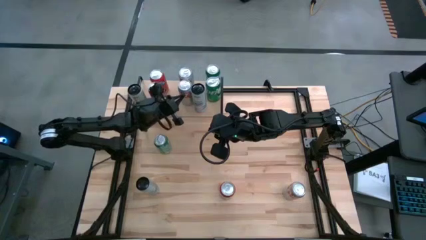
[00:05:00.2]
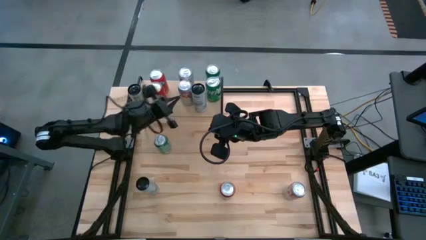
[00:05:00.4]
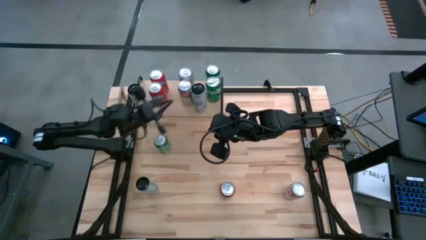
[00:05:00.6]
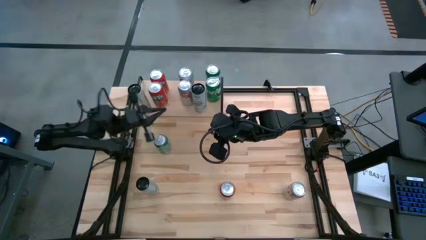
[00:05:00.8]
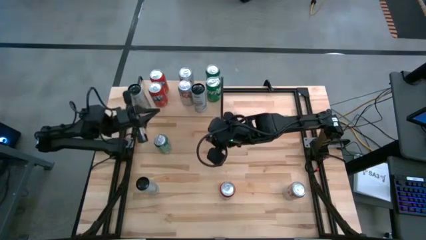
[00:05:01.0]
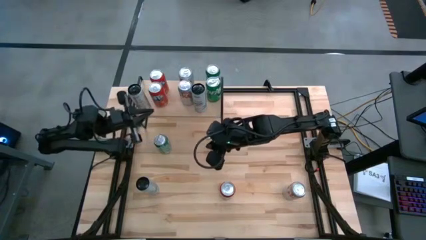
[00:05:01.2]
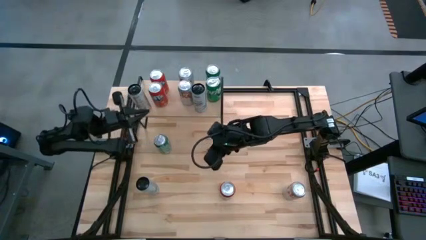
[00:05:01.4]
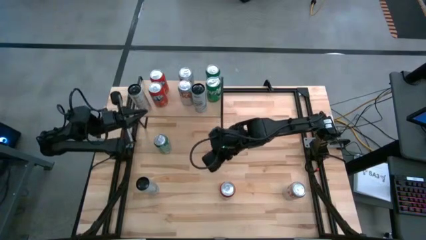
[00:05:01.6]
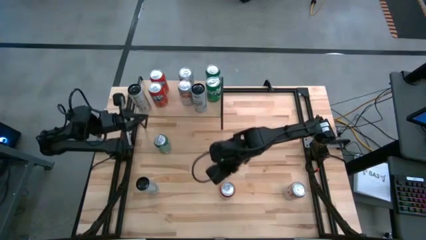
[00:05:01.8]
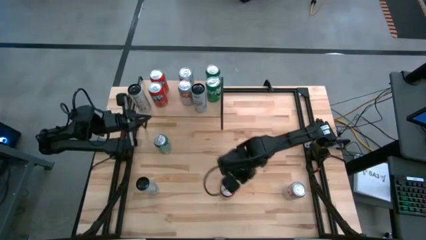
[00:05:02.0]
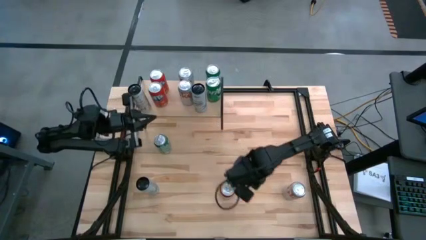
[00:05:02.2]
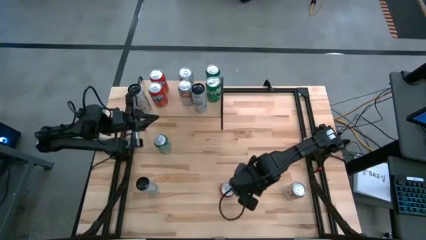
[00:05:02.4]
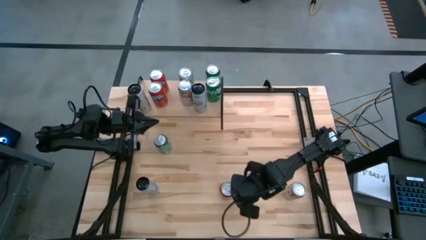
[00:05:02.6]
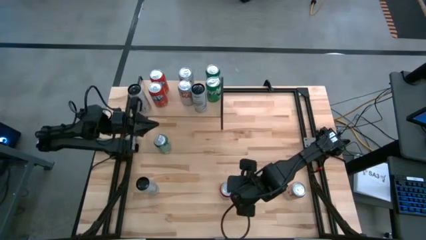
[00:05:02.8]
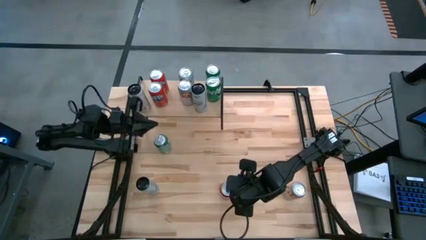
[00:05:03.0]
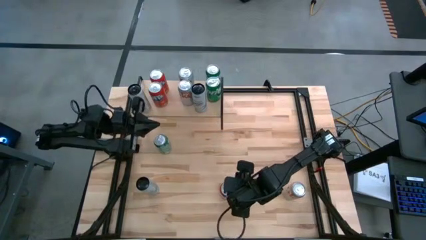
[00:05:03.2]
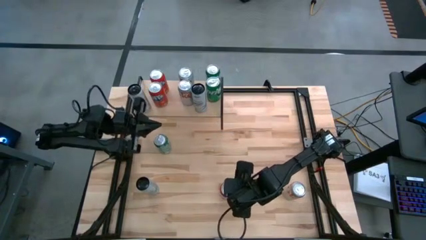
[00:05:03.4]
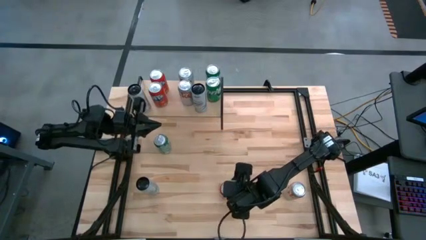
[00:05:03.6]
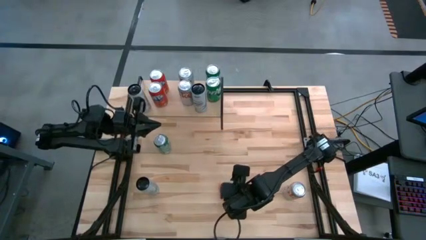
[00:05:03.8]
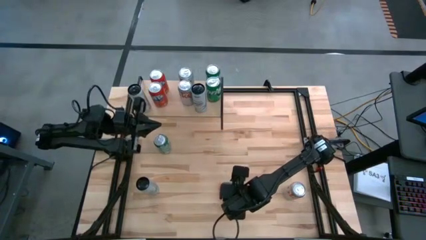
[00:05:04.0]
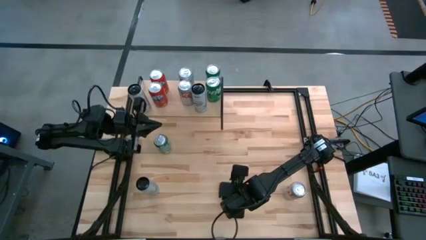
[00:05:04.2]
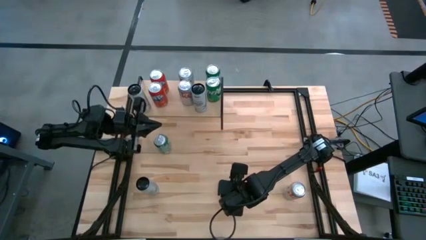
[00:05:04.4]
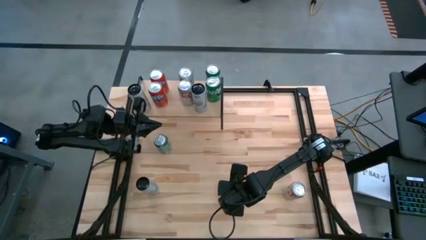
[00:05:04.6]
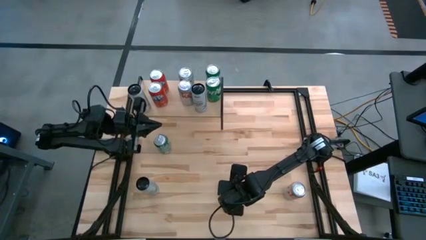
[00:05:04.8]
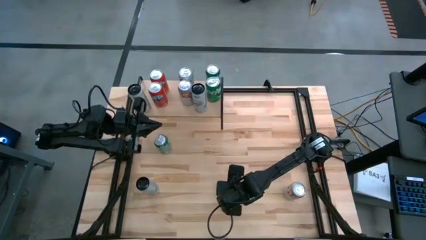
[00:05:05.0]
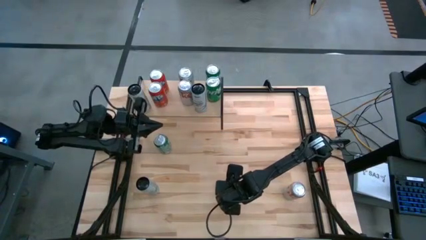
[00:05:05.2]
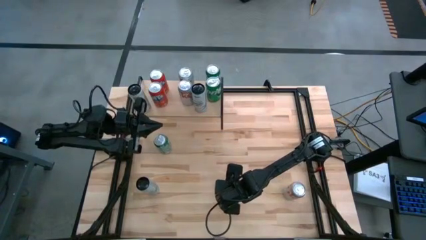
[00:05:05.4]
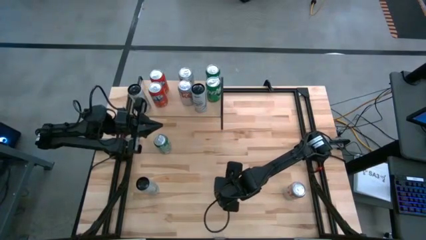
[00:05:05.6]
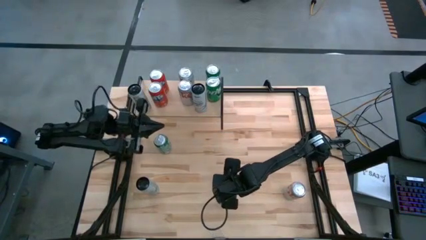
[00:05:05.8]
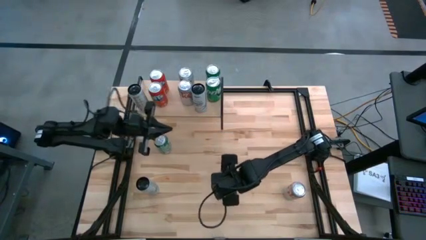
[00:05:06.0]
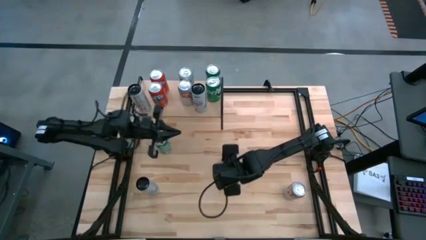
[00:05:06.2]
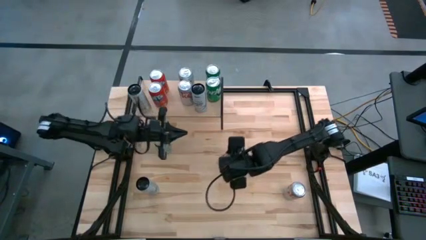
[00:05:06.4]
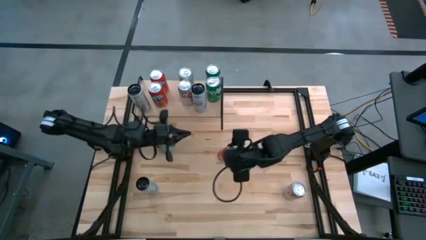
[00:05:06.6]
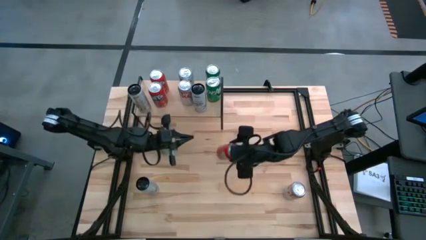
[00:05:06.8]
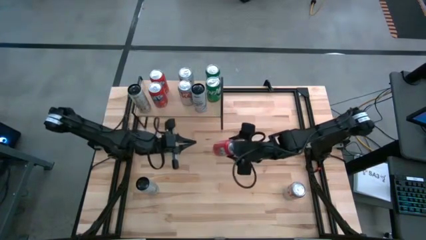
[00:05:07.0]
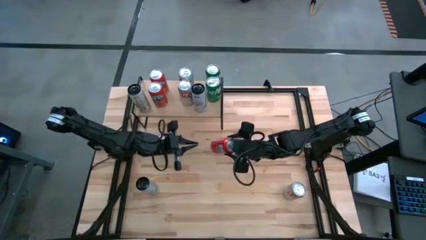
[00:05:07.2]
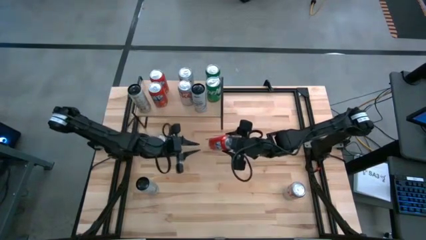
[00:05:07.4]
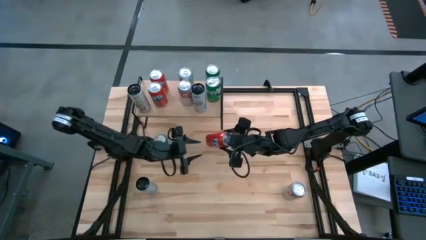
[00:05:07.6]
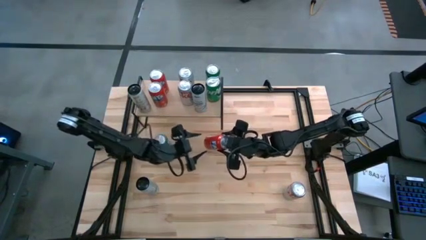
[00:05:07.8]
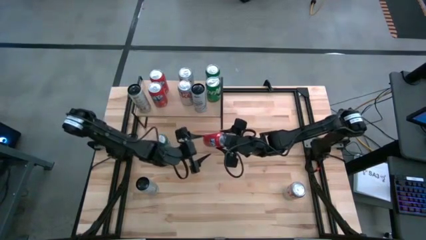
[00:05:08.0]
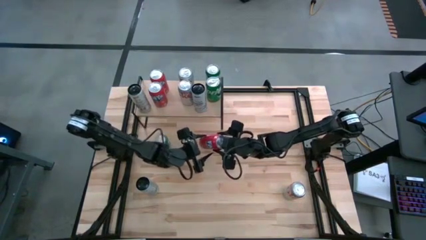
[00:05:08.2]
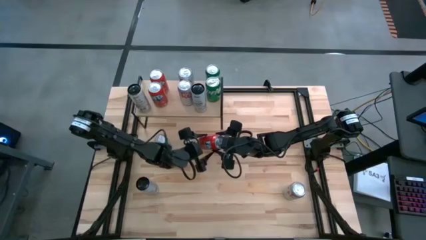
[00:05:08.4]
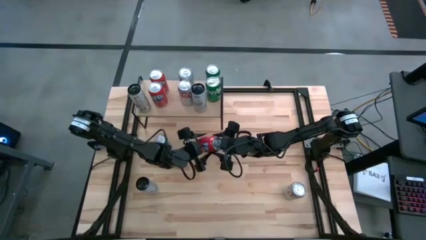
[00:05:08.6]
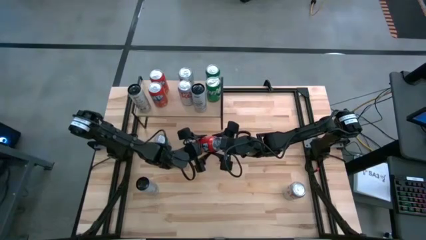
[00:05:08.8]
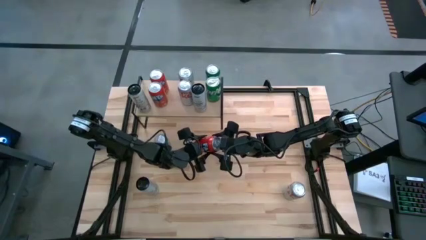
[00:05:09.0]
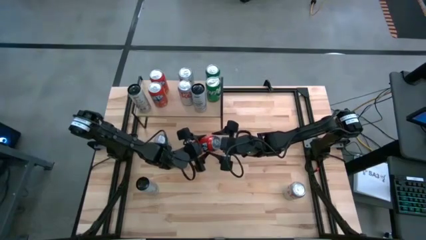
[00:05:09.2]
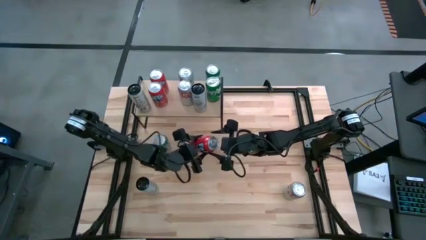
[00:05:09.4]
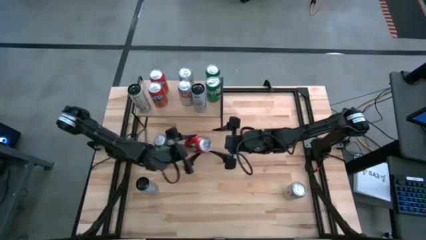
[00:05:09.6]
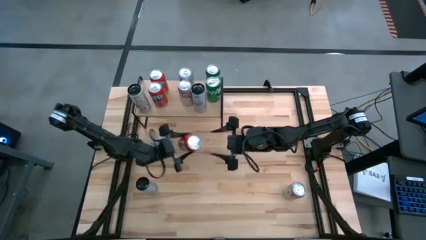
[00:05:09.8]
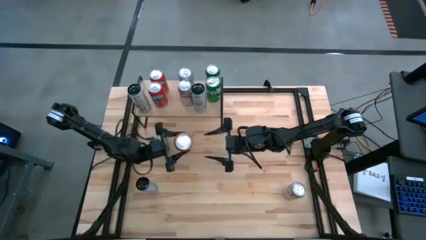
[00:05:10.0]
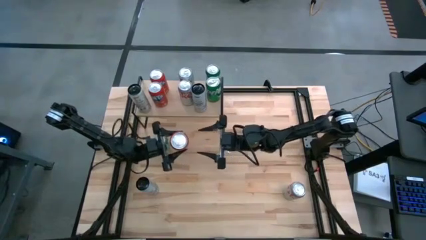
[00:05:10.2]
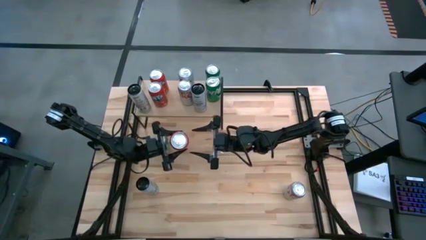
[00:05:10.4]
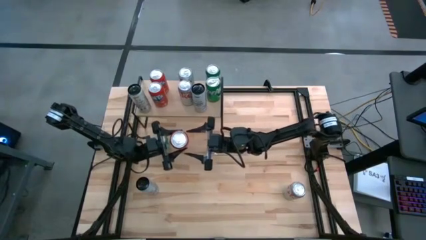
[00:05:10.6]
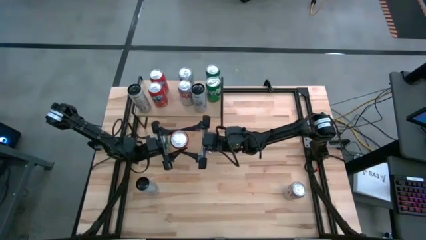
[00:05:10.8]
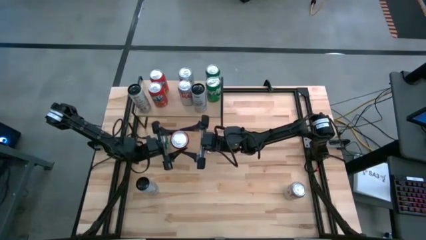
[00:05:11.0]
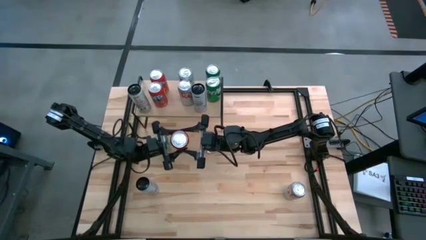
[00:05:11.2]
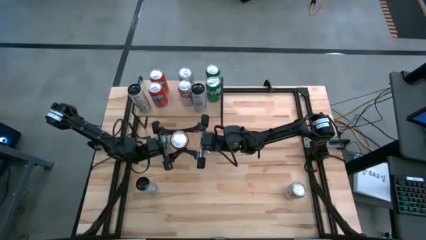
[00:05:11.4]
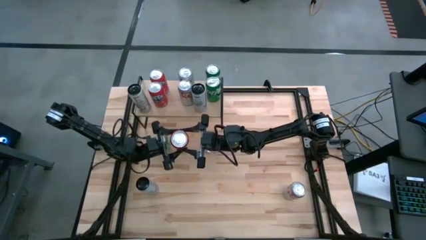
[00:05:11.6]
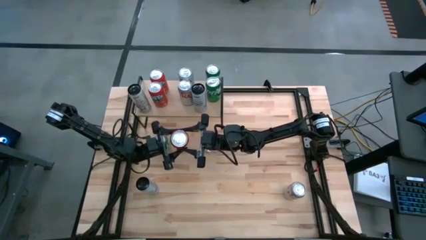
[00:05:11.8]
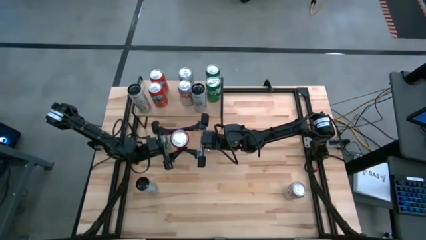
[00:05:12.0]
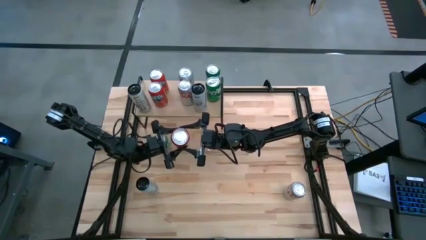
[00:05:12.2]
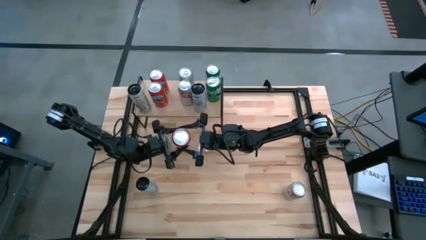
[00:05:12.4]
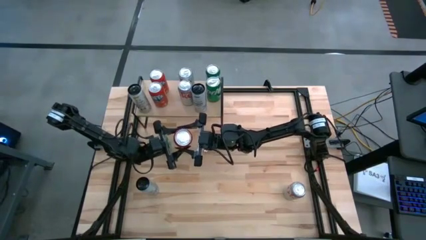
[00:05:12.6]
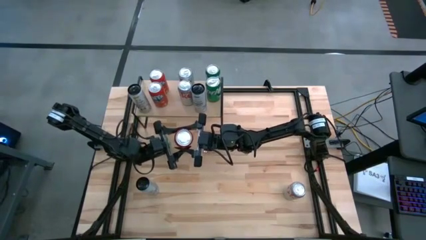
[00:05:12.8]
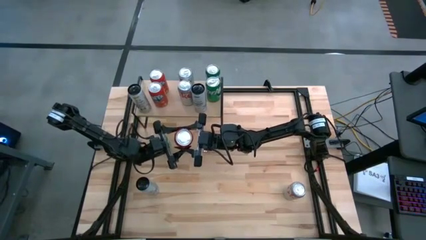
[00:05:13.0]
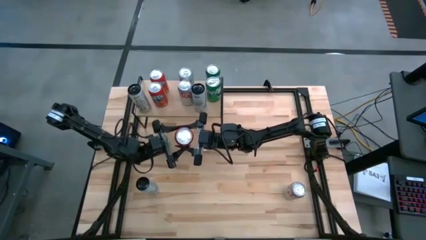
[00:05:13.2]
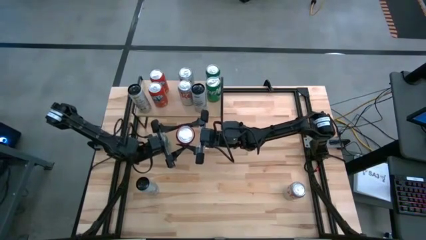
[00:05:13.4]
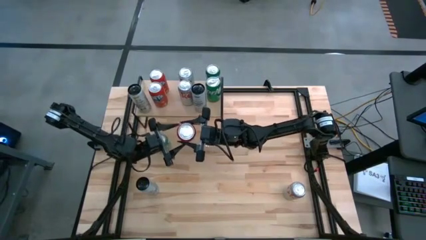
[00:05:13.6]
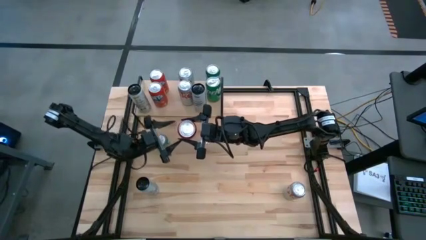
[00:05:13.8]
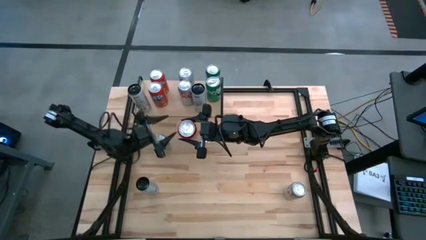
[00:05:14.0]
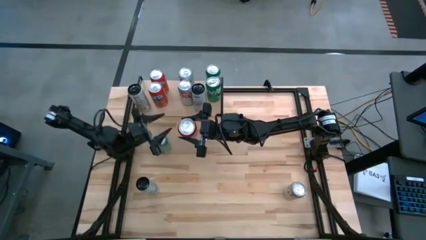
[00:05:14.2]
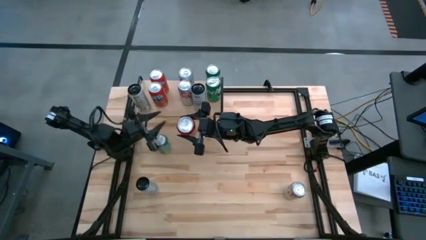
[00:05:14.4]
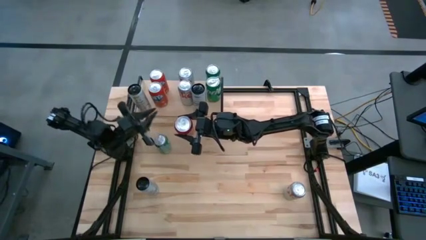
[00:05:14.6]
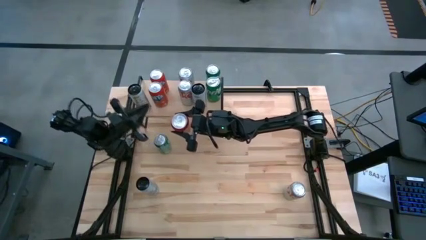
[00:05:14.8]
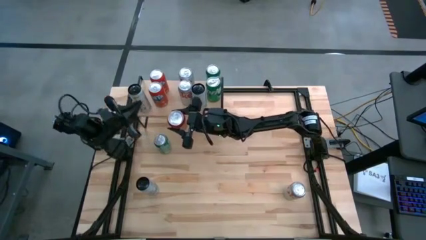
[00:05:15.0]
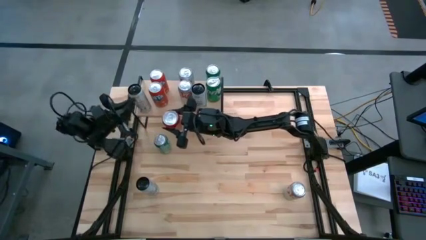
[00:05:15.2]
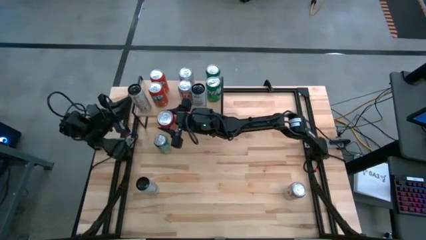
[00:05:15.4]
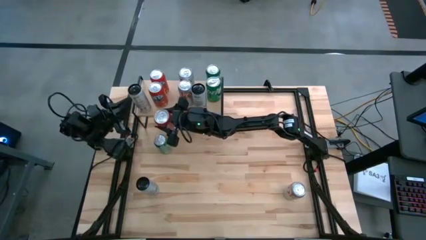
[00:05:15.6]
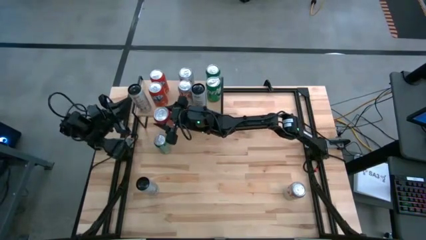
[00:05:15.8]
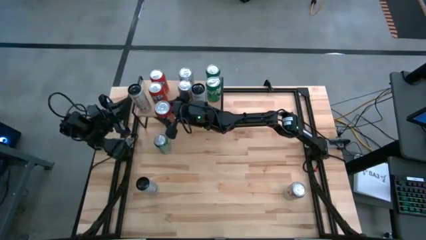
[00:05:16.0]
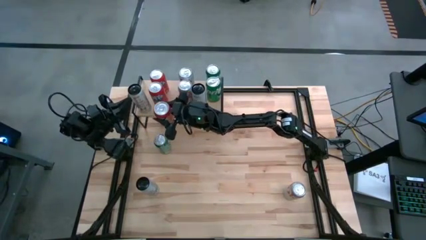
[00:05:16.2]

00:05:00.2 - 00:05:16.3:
Task: Place canned beverage on shelf
Put the red soda can aligned with the other red soda cans on the shelf
